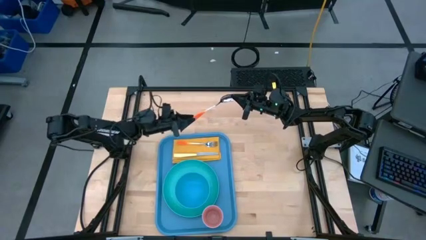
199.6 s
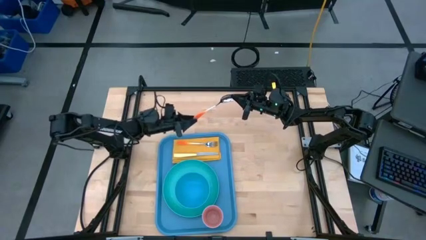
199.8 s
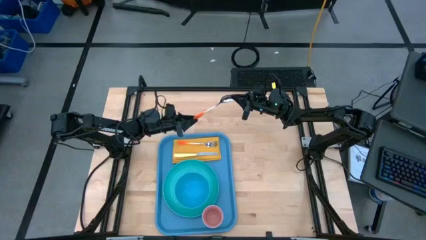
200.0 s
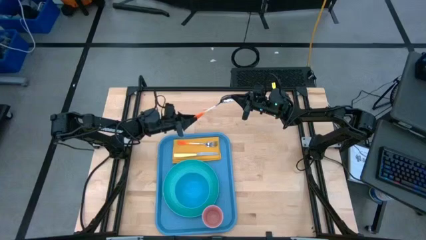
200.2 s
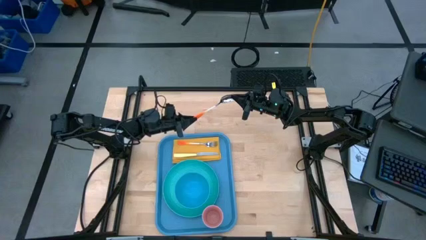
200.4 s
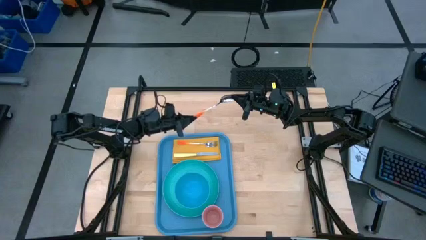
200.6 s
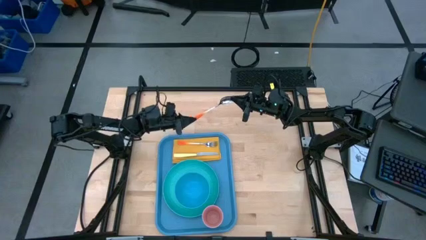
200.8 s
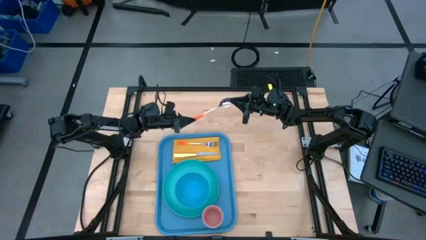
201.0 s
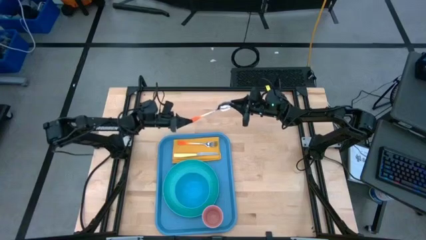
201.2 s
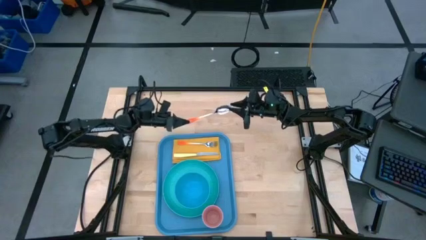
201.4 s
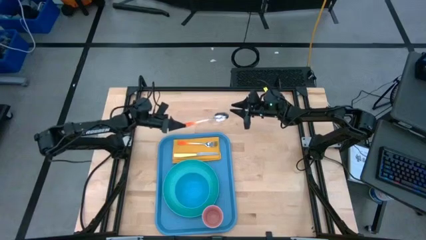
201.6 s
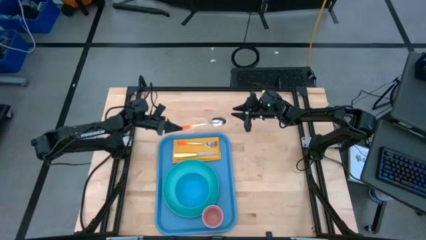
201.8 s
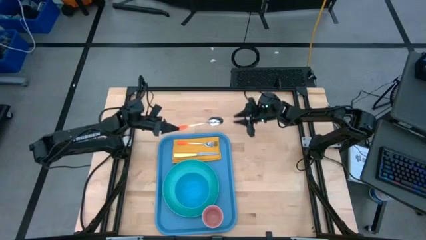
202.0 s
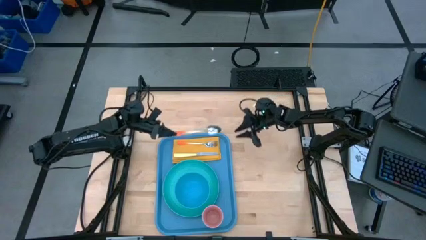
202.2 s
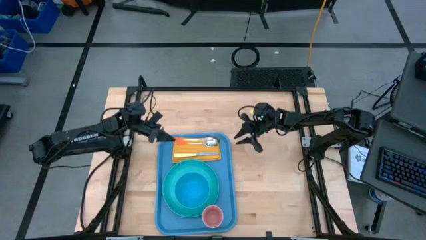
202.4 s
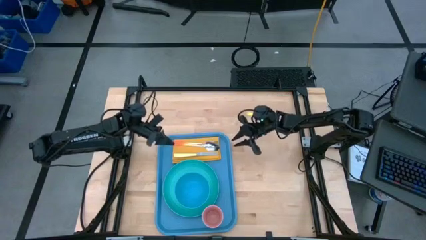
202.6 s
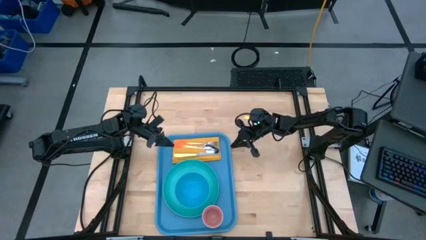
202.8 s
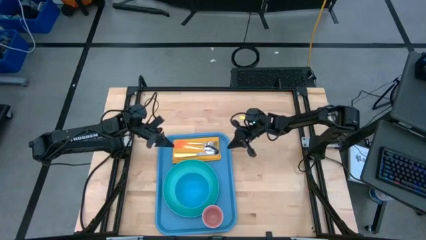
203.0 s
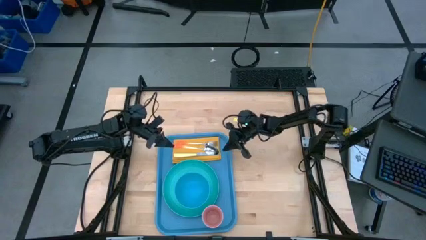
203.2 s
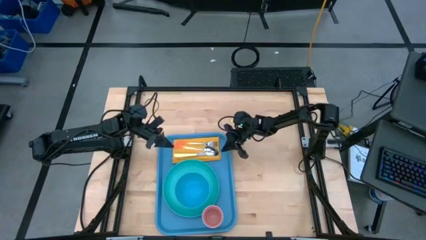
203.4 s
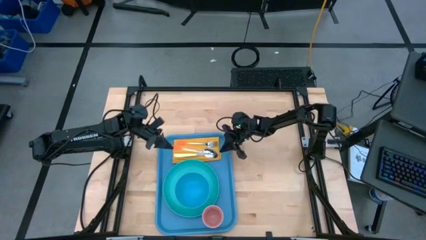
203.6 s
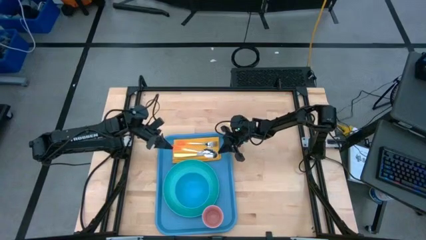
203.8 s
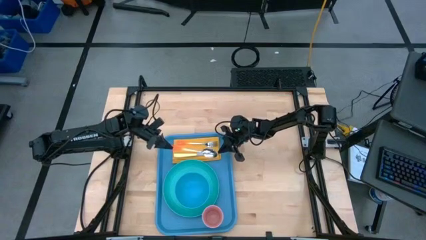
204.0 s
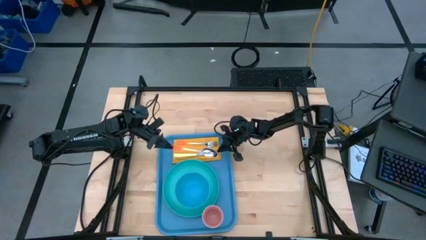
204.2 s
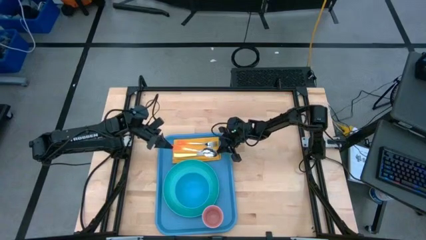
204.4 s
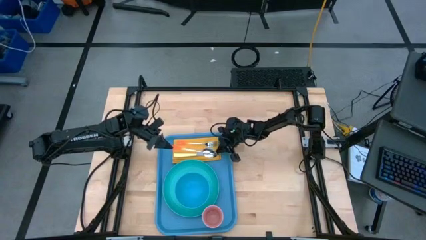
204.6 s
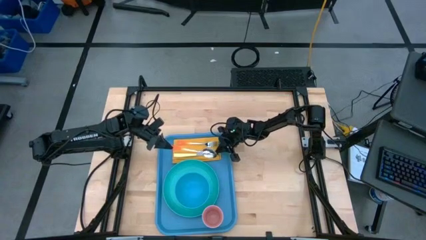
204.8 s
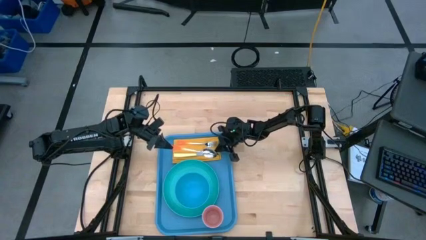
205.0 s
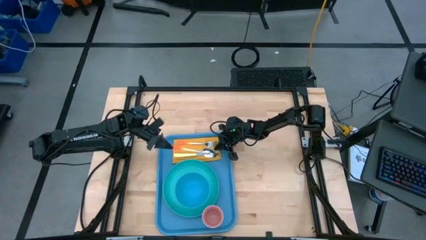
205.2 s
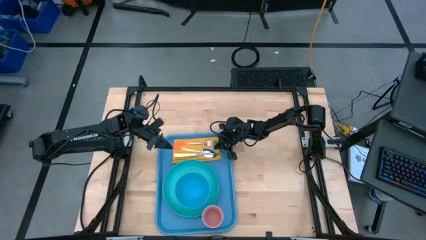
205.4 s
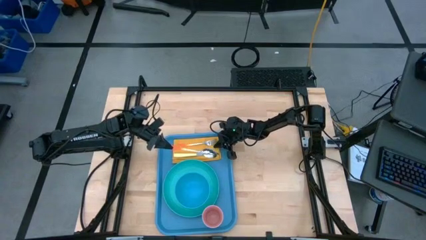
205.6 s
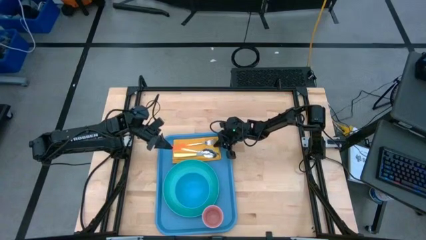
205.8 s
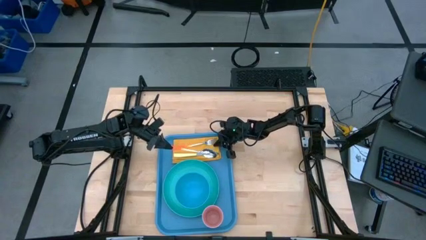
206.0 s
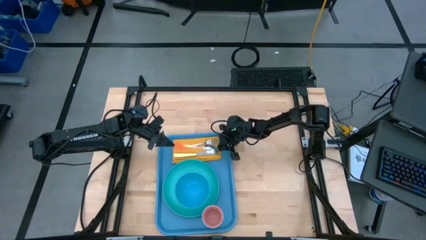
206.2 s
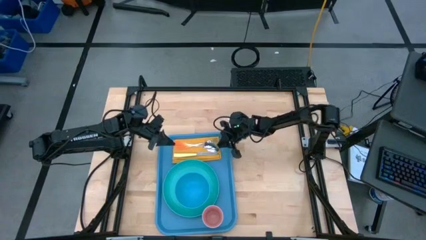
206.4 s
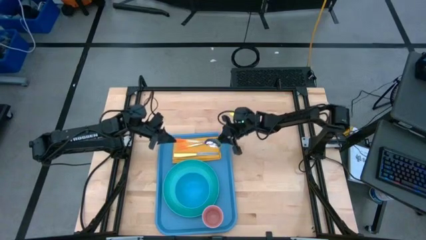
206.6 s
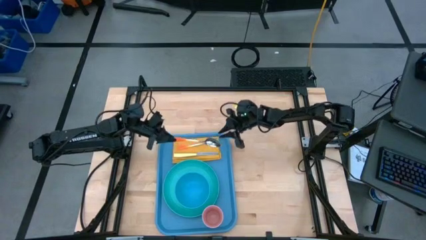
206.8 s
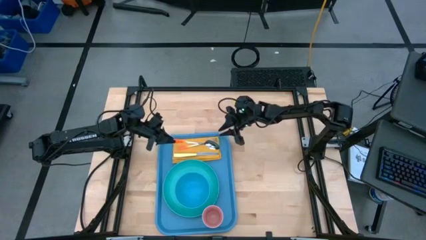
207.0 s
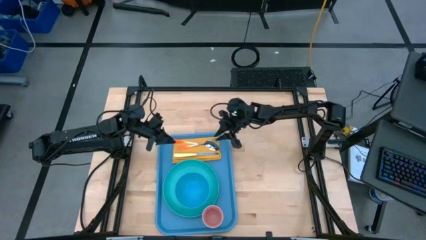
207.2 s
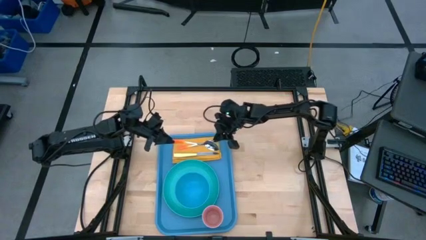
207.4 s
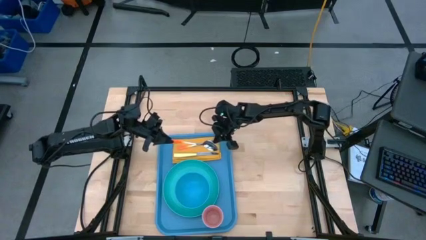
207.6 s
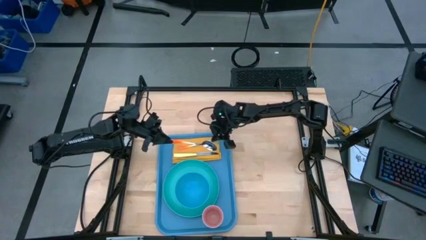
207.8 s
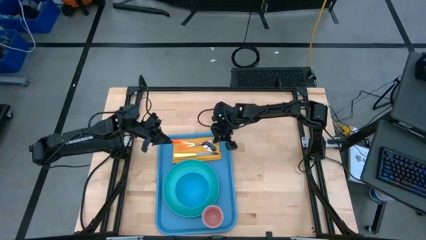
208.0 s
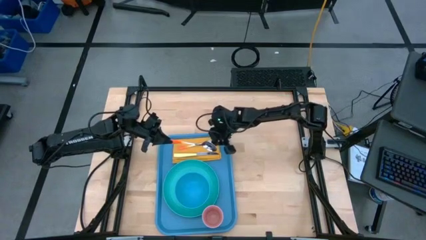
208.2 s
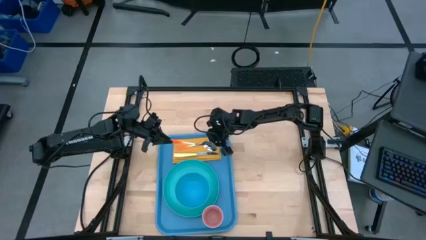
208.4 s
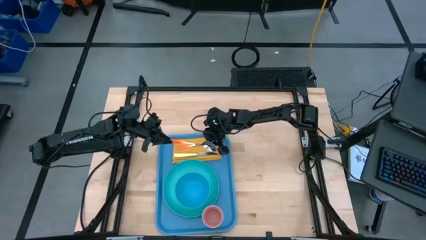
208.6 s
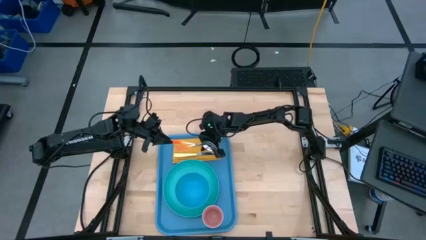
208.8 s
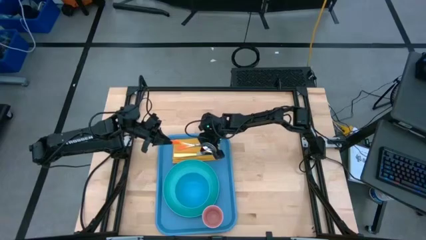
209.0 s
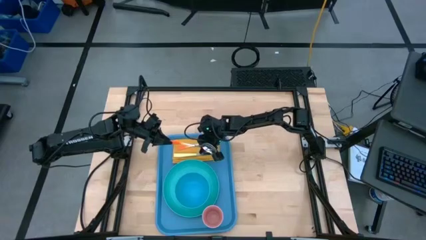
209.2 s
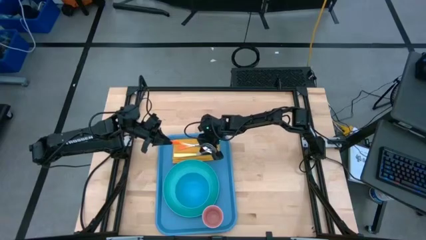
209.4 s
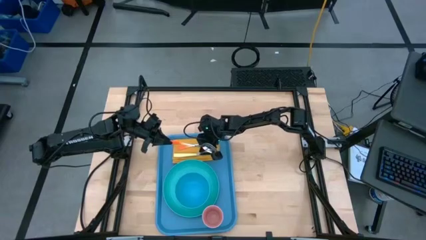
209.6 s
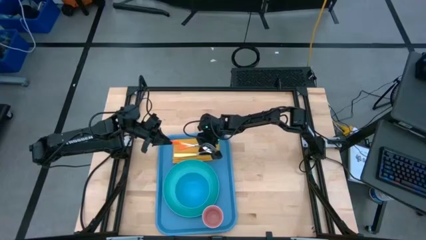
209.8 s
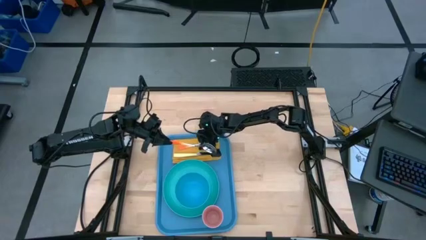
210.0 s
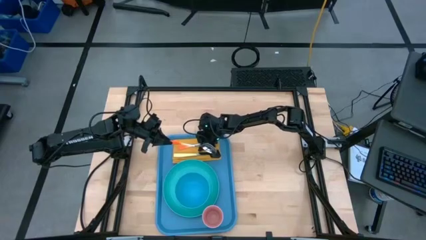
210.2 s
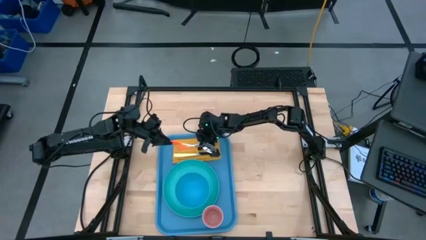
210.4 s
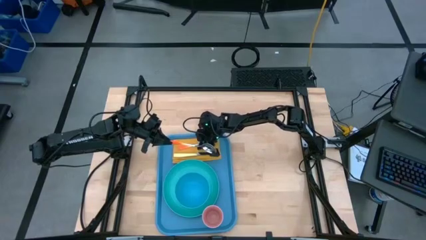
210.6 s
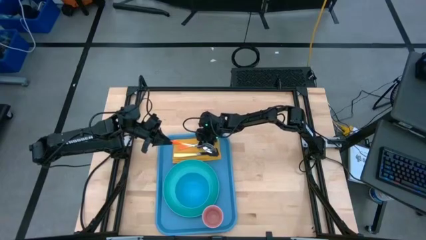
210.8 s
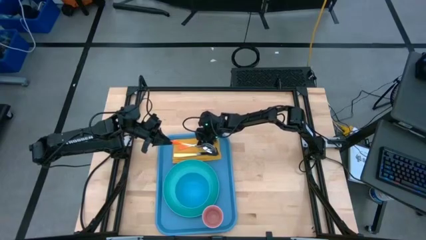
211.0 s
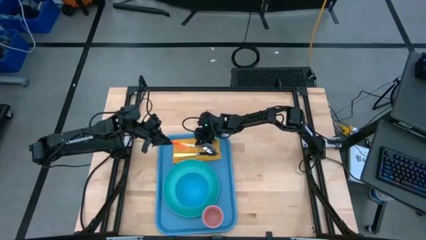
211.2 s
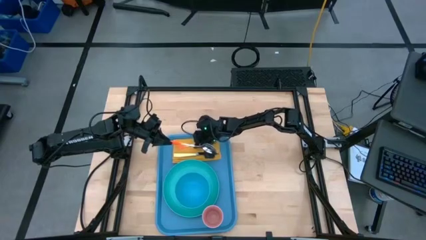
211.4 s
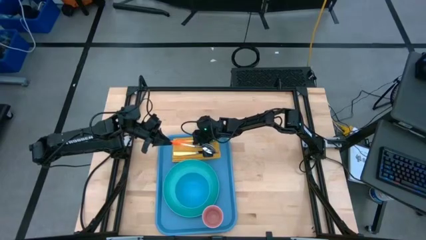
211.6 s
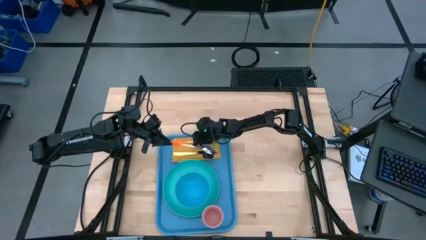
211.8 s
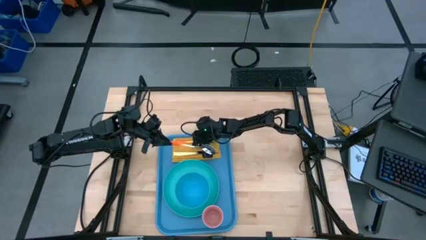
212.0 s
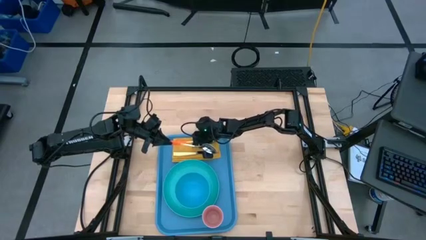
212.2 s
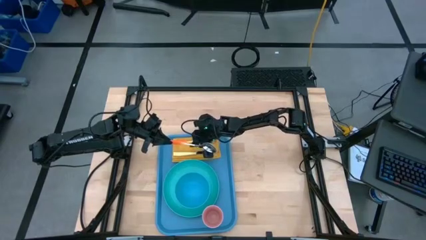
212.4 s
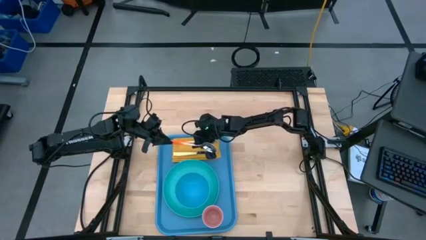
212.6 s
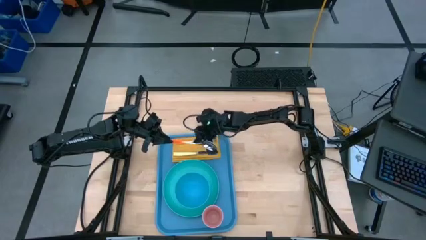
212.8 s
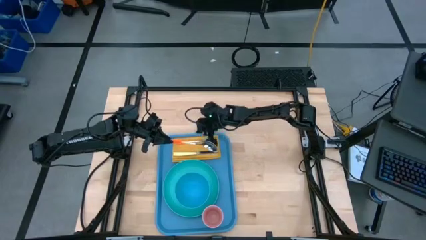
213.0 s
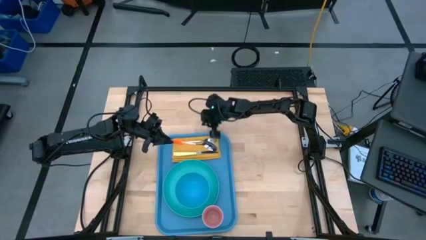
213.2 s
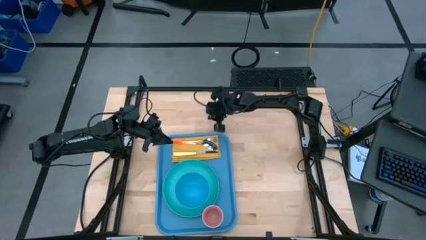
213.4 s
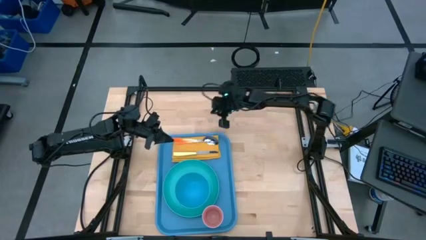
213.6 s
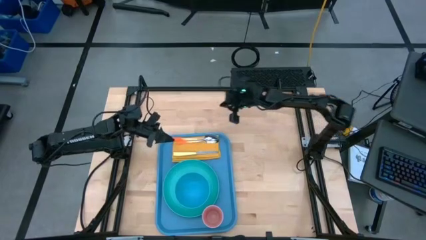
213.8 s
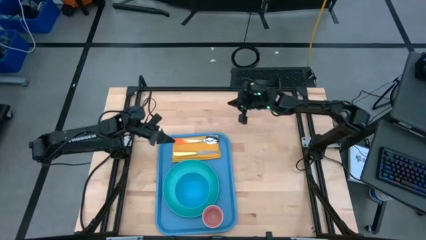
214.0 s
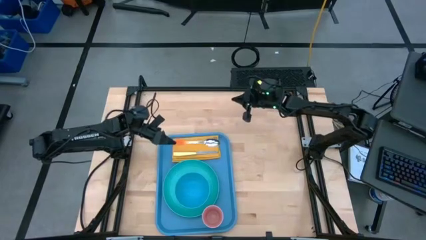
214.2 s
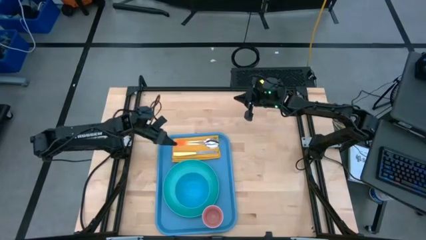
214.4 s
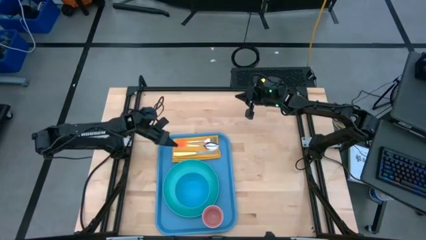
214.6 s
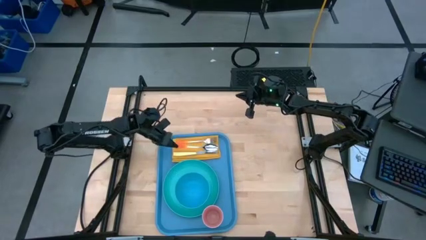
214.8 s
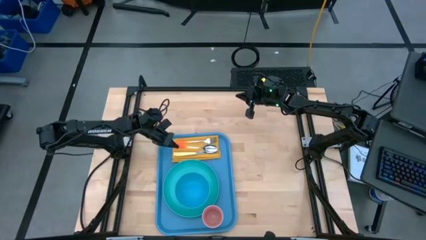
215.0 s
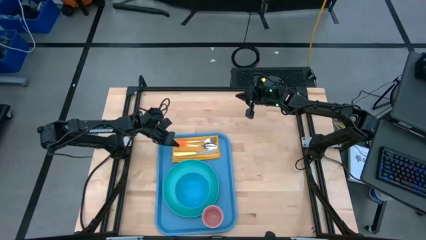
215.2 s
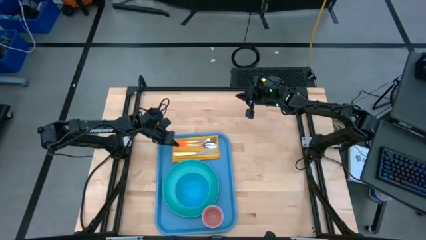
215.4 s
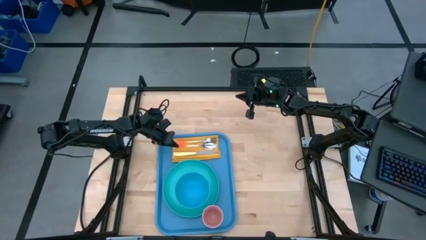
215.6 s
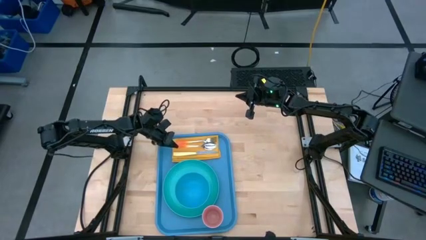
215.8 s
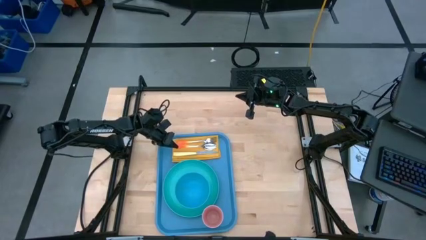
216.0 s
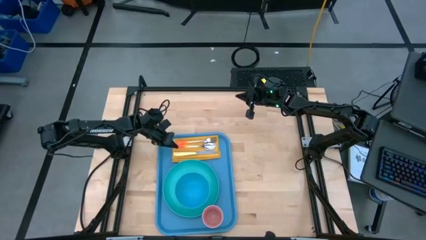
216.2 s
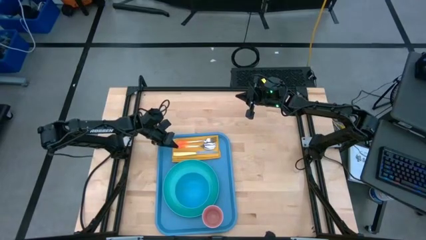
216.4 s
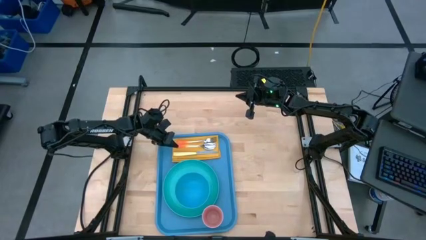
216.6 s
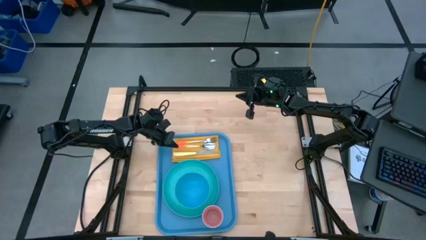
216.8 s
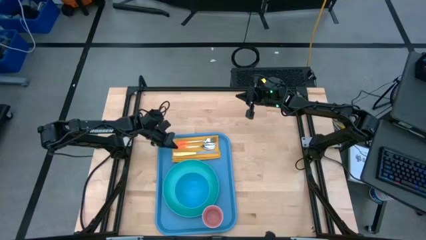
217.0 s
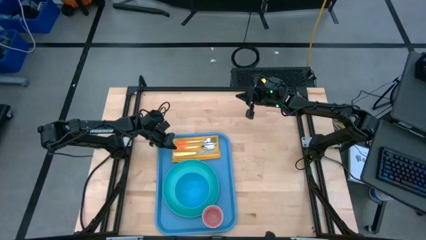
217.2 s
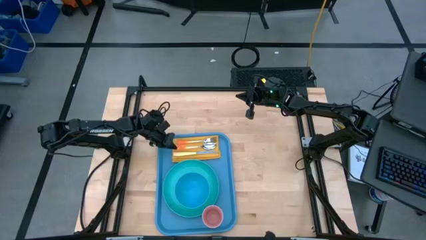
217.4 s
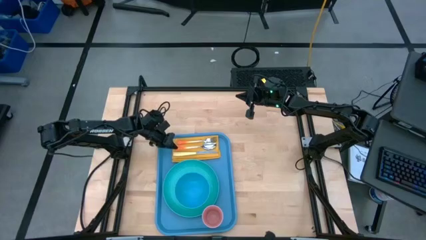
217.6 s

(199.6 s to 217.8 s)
Task: Set up tray
Put the orange spoon in between the yellow knife and the orange fork on the yellow napkin on the blue serving tray
